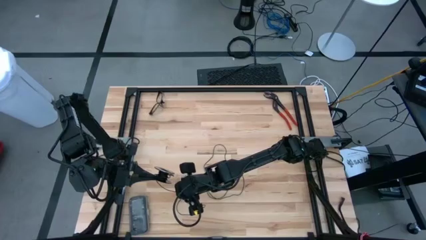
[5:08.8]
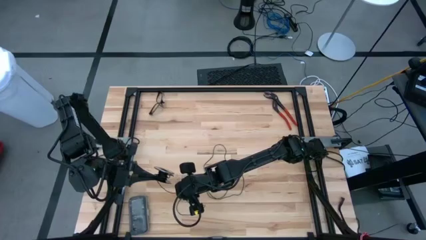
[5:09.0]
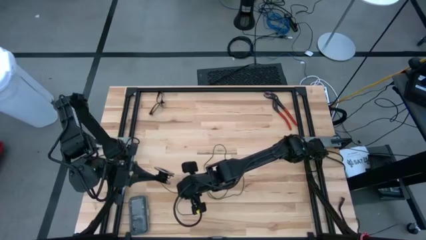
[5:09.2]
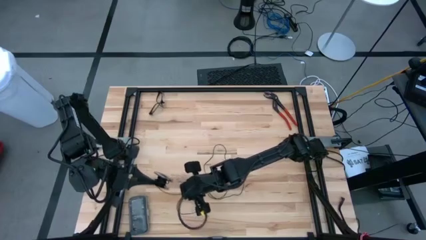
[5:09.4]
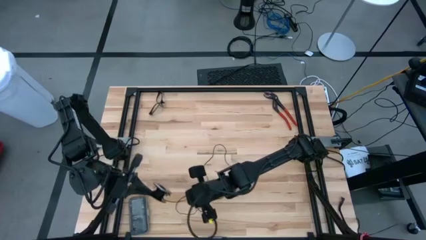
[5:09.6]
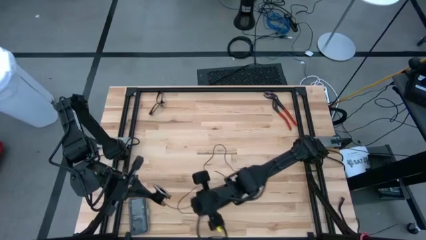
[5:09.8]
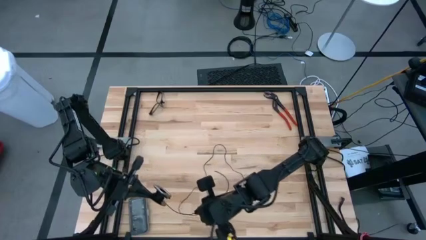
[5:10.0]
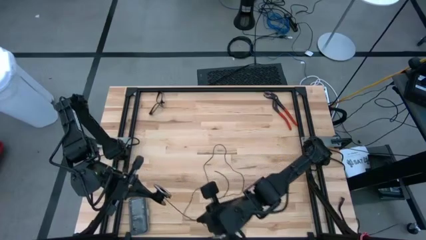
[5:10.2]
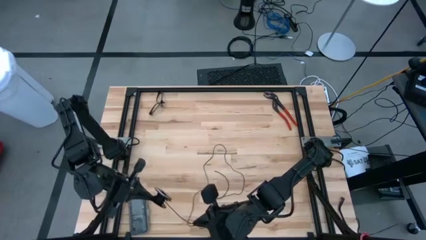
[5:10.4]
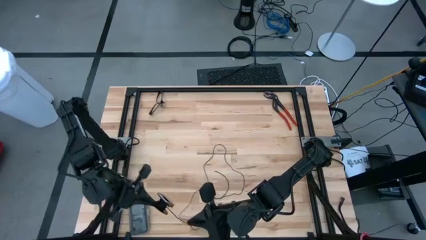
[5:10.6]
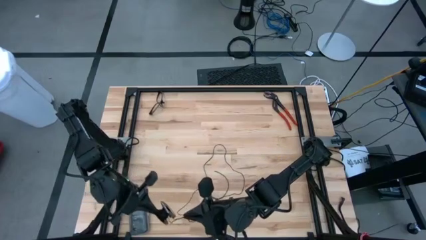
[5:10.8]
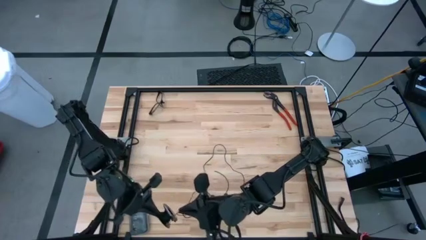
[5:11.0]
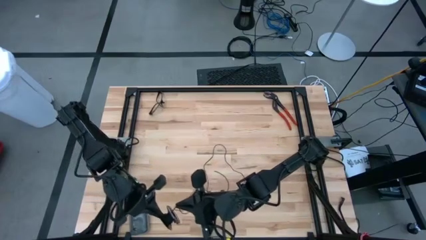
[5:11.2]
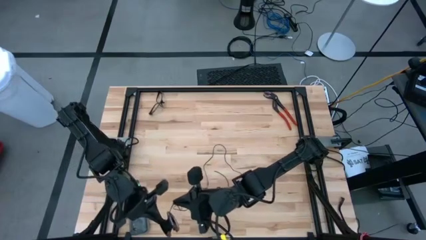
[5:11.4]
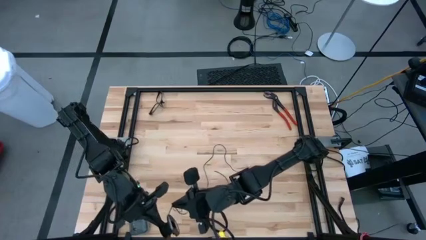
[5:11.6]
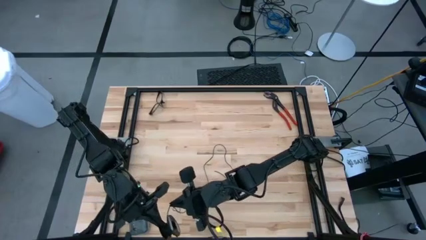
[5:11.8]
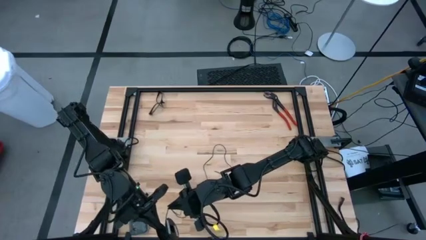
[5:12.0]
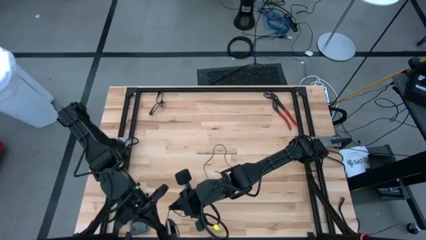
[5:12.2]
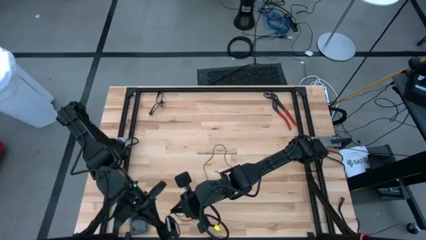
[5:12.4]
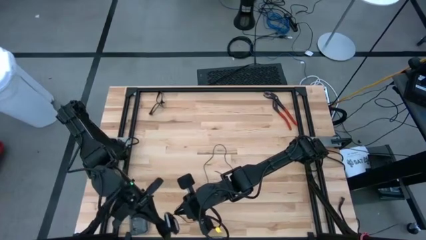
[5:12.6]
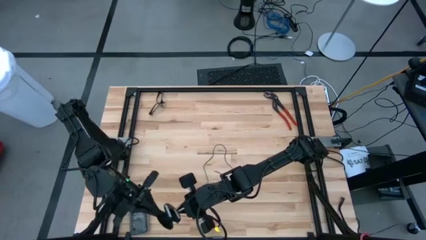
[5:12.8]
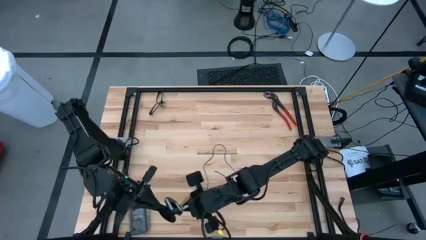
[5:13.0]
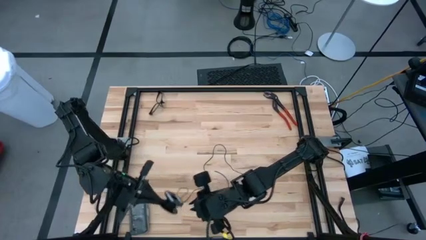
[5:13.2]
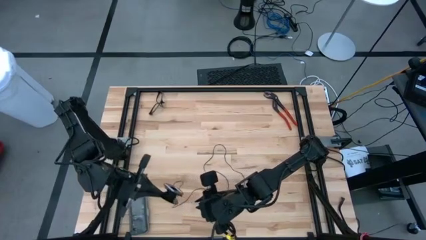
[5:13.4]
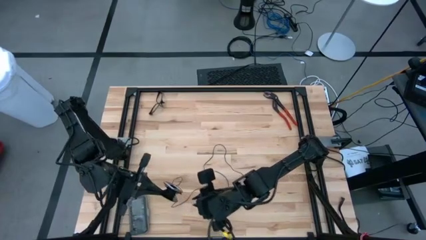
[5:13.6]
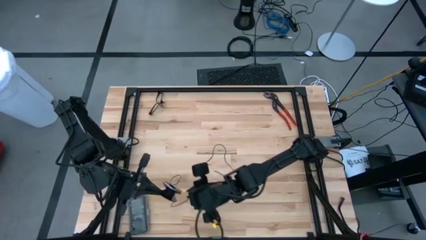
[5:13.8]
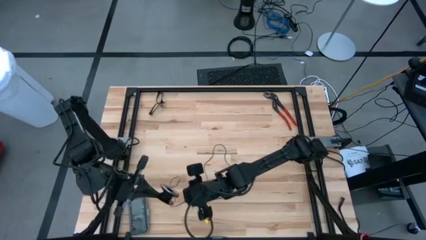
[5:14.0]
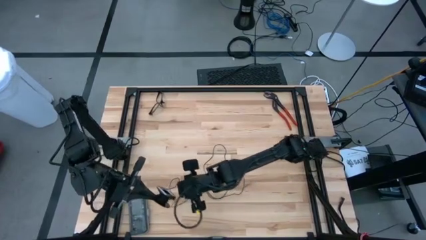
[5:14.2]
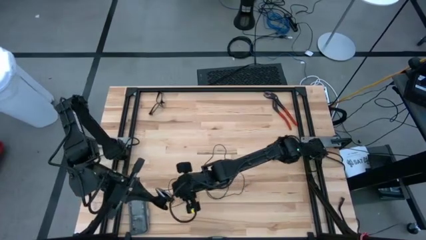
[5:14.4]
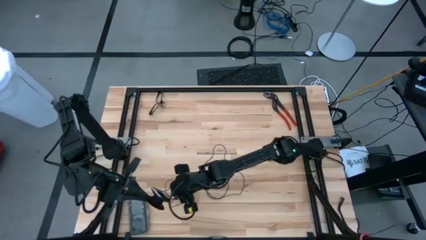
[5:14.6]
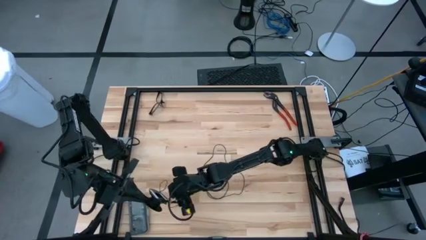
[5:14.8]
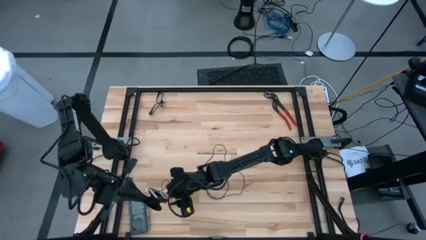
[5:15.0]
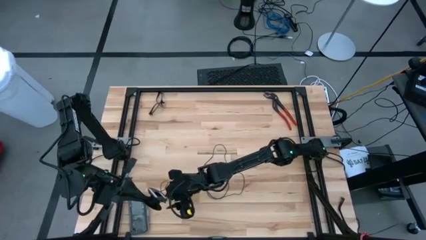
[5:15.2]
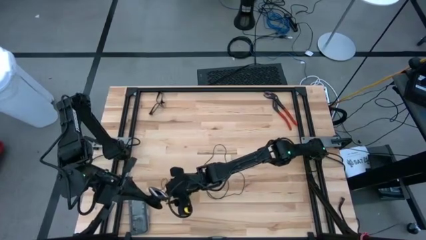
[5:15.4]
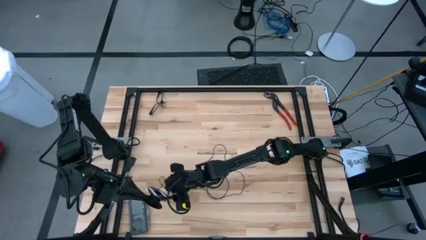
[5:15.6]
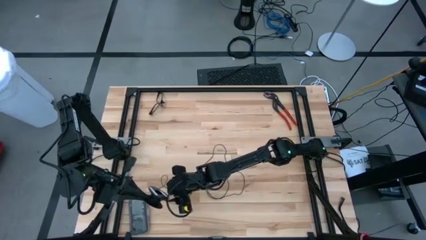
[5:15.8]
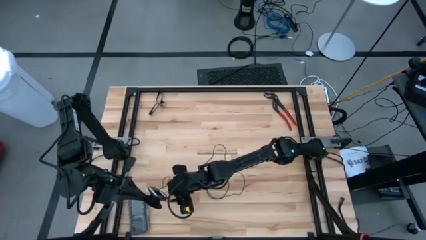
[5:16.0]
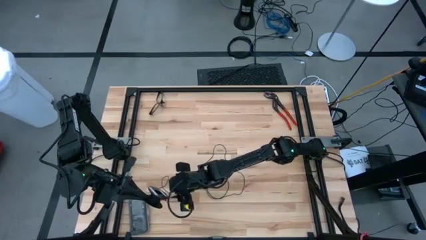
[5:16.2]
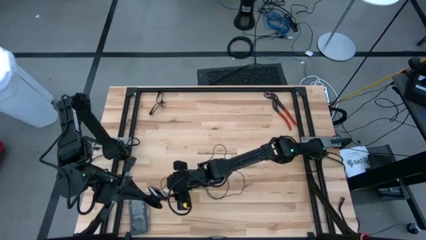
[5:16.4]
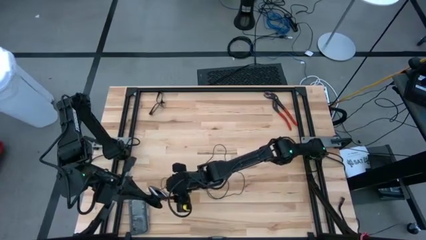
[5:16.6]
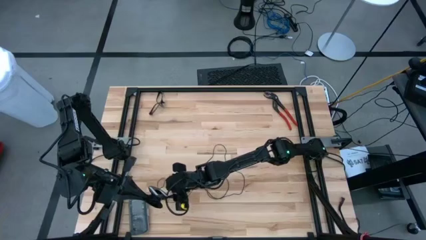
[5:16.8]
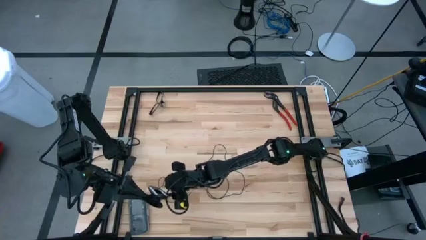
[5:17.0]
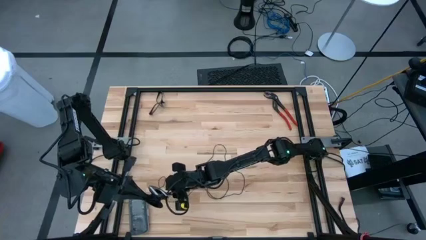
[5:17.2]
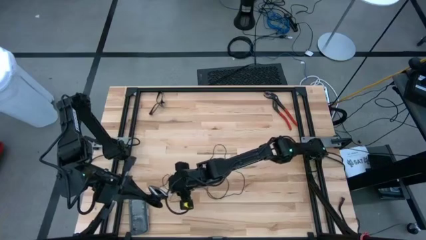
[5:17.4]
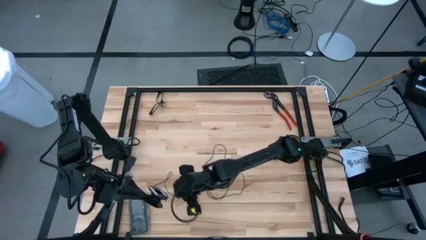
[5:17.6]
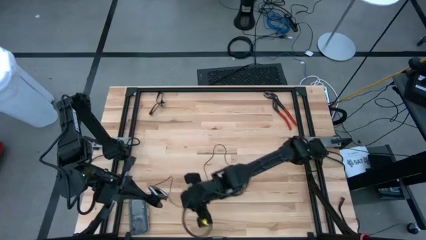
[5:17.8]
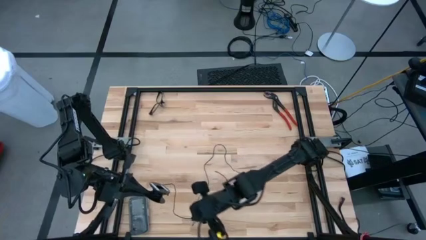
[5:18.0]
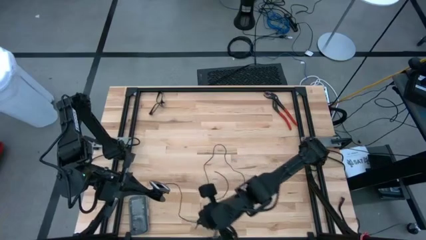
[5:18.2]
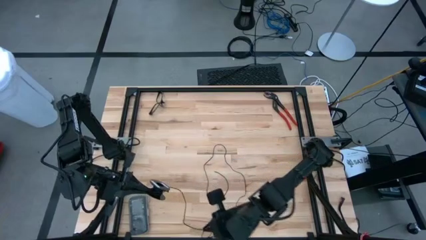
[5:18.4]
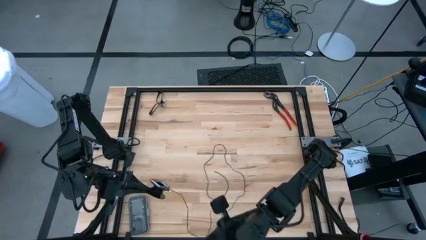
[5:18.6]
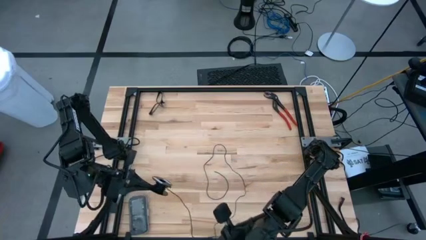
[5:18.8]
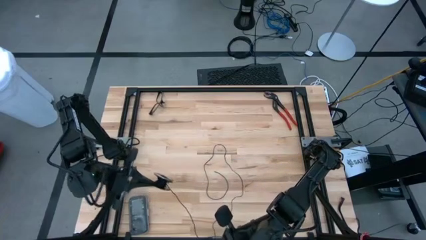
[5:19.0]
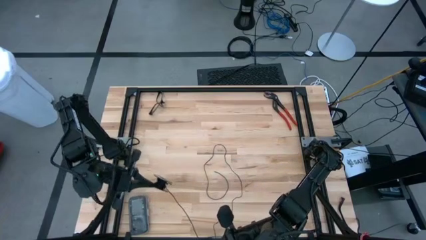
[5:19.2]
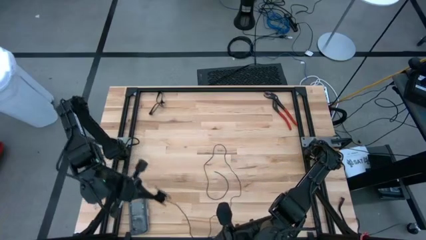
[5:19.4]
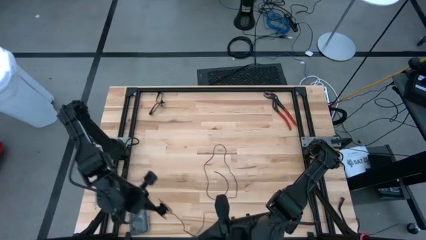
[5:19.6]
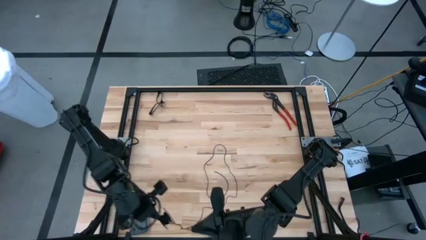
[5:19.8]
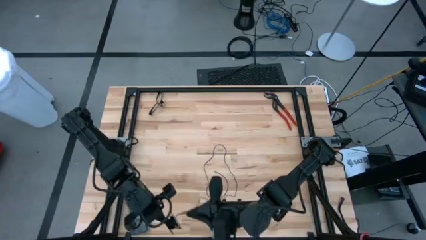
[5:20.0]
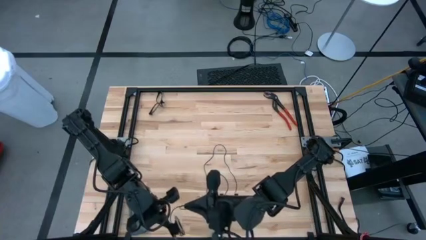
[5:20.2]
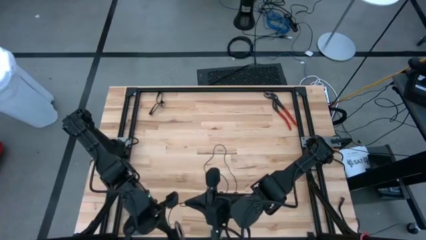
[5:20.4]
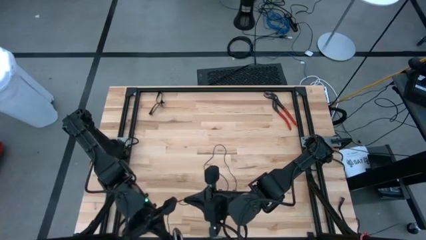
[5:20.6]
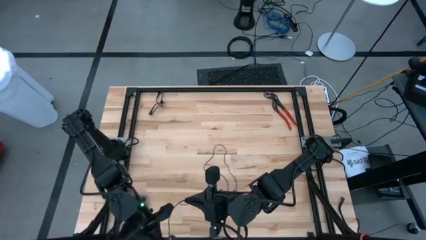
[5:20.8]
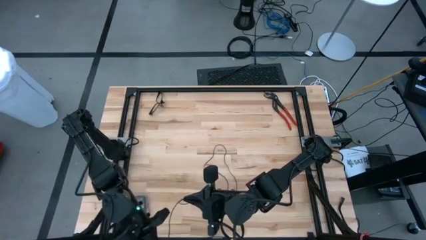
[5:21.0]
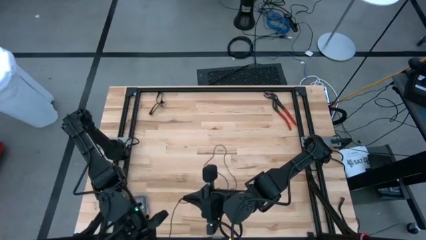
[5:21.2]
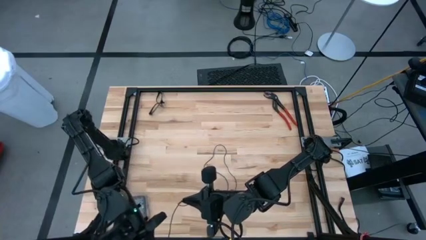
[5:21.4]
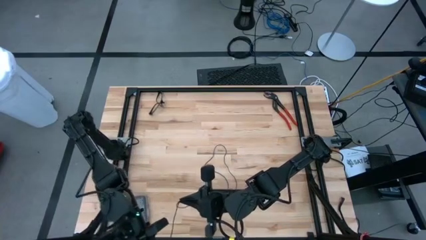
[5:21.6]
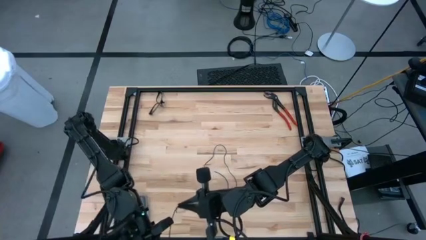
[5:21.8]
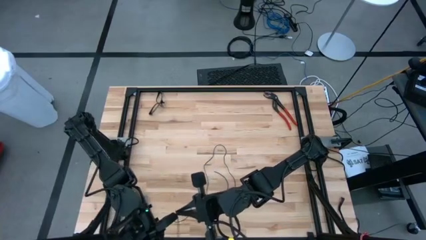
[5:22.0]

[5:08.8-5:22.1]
Task: Coil cords
Coil the black wire onto the spool

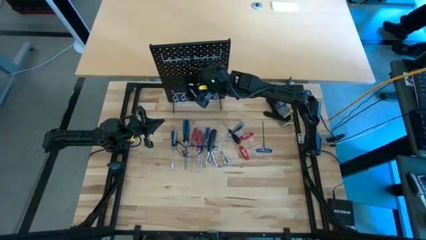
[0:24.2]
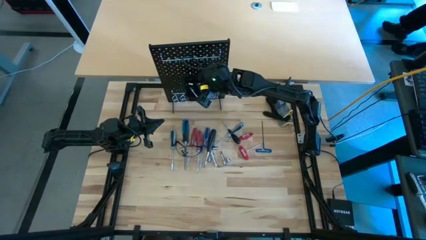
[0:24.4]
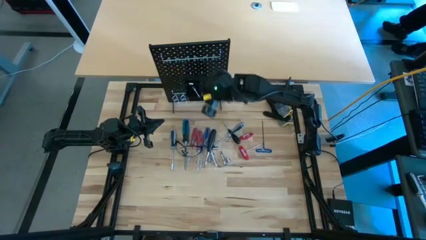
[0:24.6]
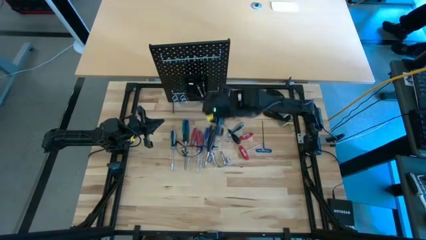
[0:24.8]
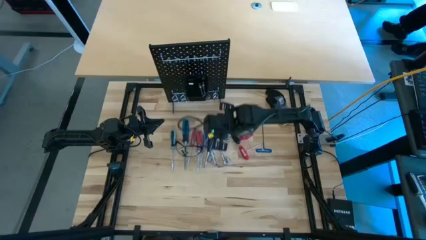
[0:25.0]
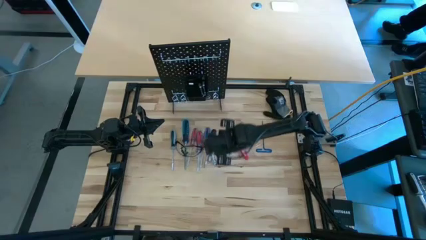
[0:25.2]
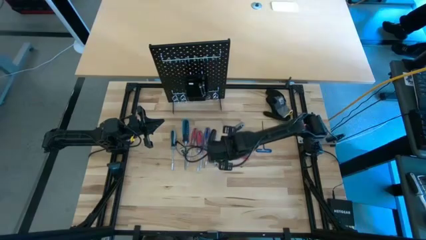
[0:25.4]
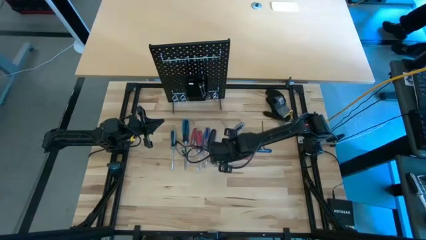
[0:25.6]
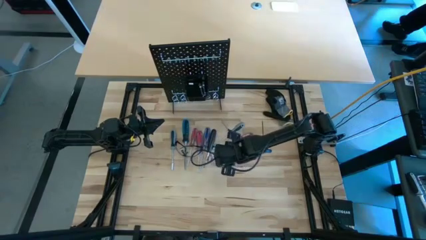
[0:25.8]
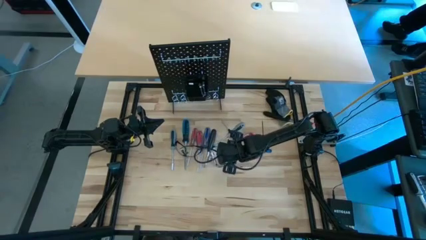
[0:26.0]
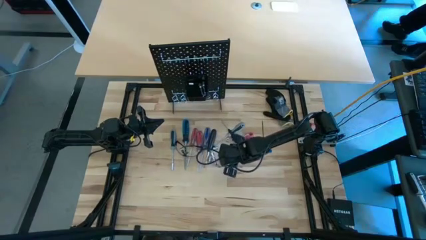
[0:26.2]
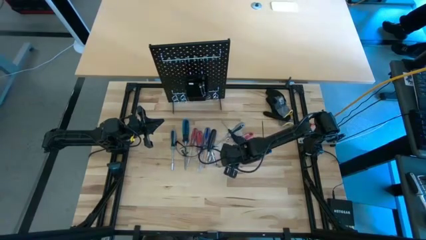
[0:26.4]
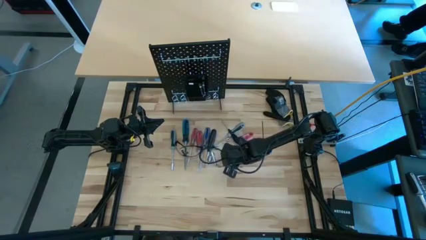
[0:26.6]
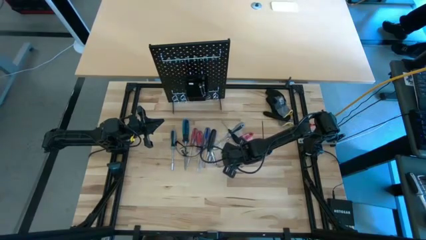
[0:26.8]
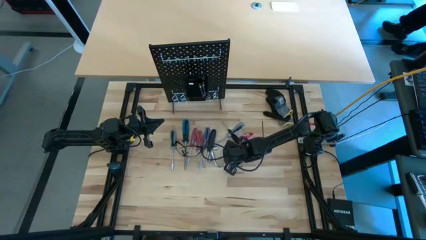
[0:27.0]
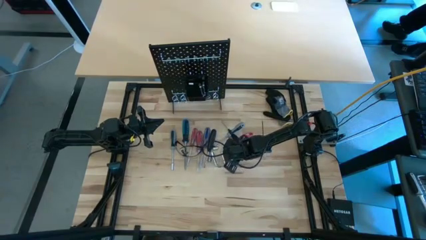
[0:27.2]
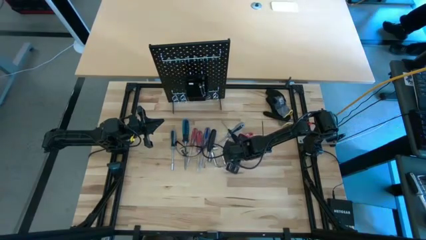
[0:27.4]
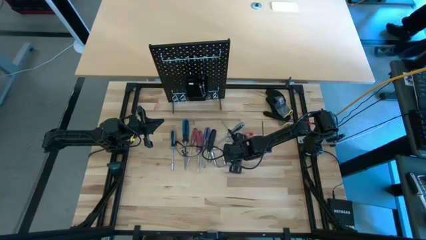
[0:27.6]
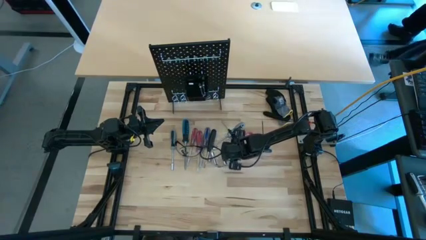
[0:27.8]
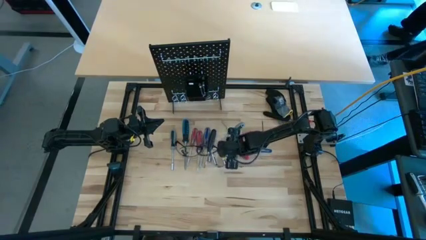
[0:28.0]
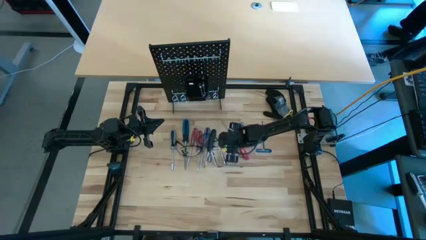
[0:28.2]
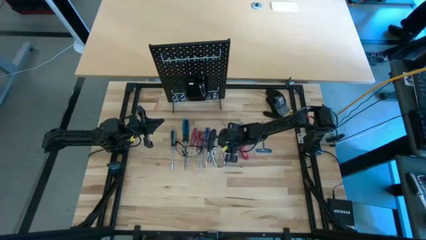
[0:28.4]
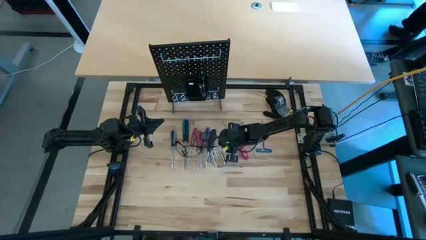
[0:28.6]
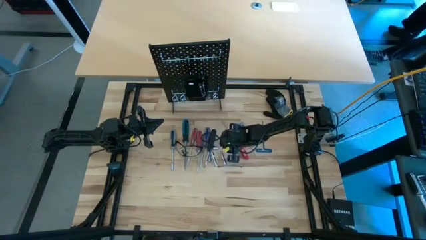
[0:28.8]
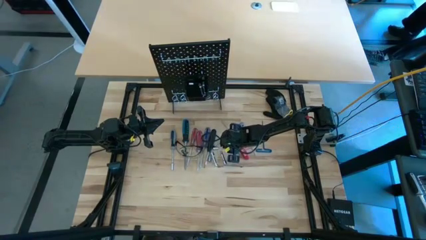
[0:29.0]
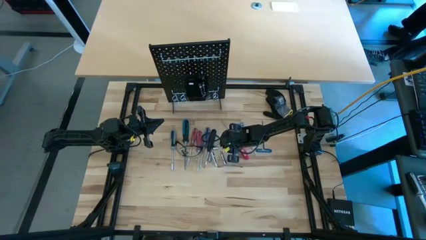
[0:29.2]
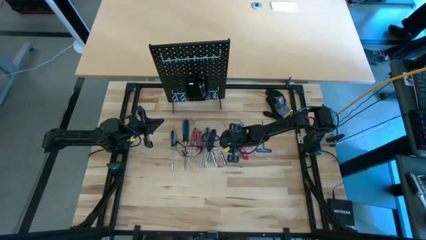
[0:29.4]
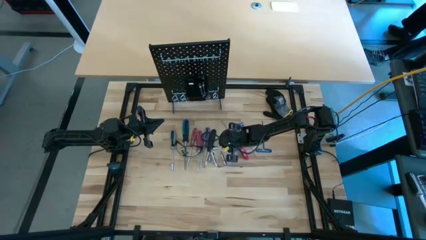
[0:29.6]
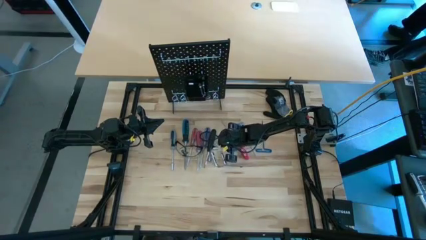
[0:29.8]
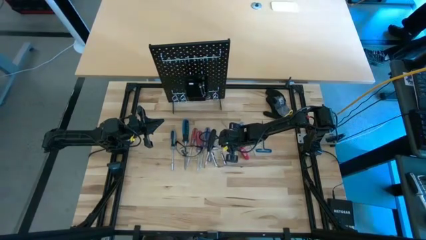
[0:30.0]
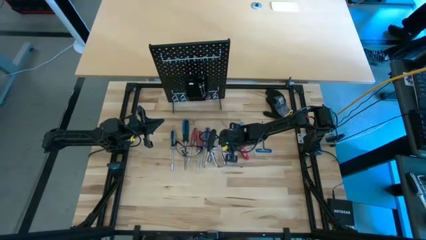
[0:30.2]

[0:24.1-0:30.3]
Task: Hang tools onto peg board
Put the bottom right metal socket into the black bin on the peg board
